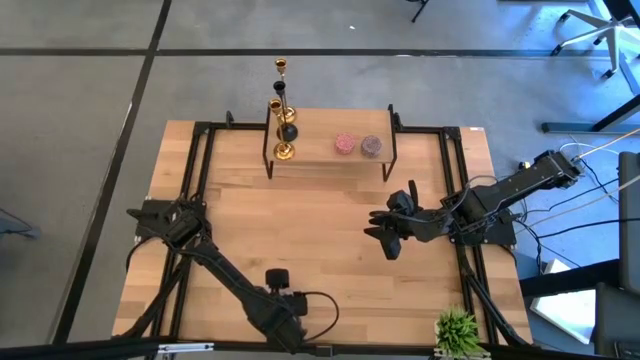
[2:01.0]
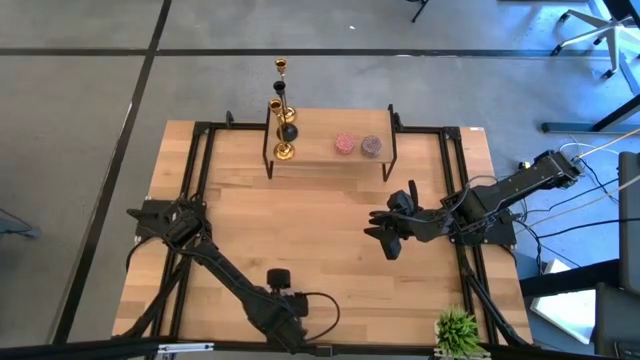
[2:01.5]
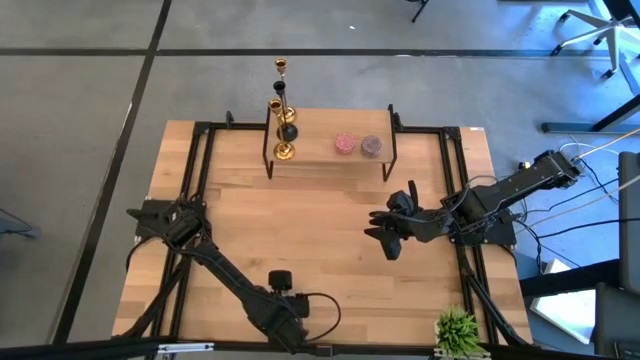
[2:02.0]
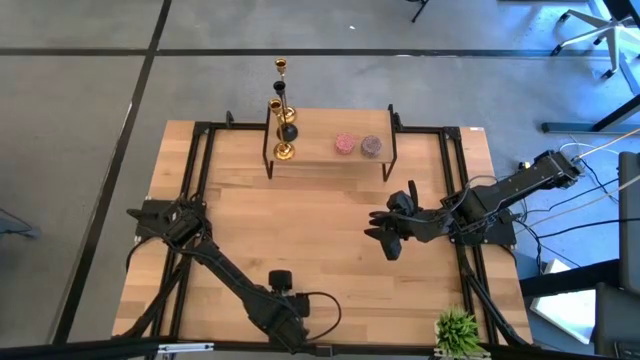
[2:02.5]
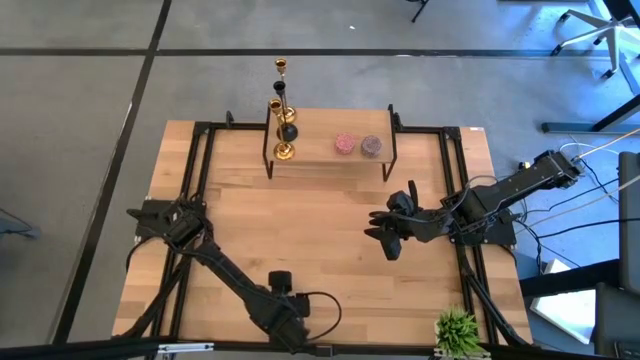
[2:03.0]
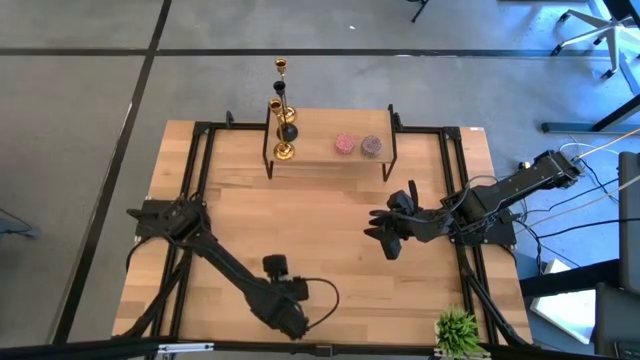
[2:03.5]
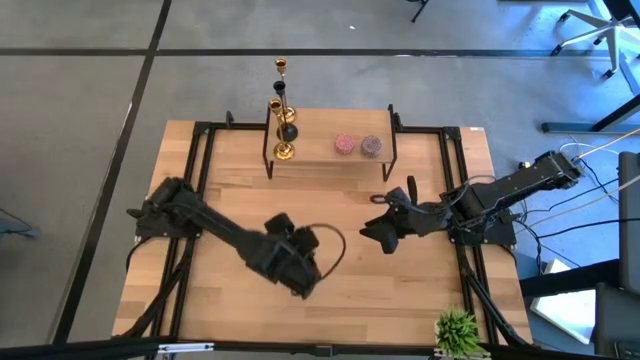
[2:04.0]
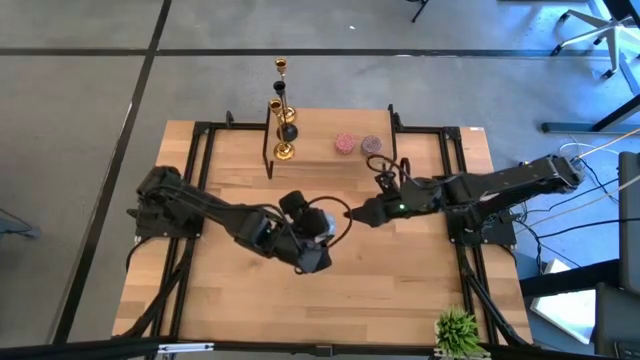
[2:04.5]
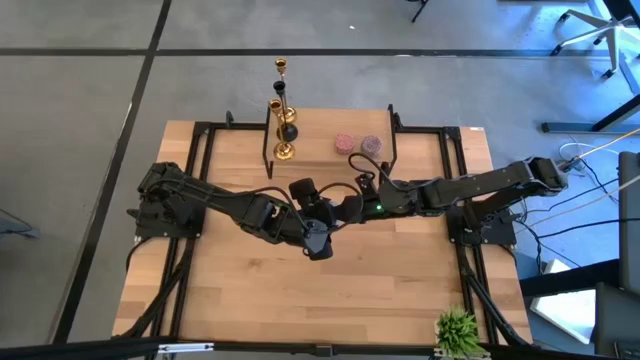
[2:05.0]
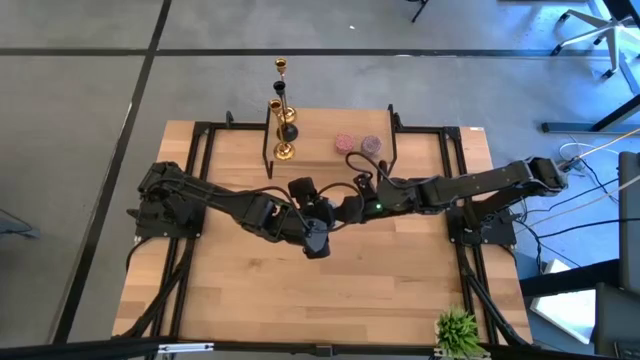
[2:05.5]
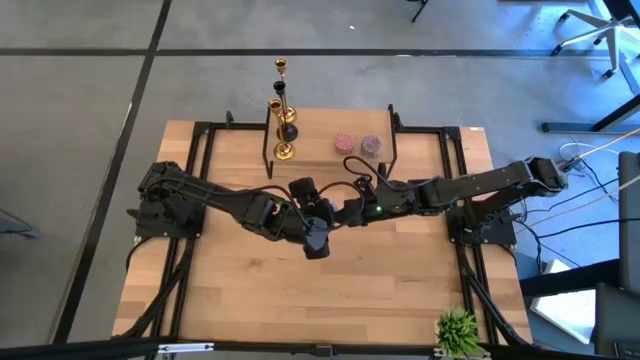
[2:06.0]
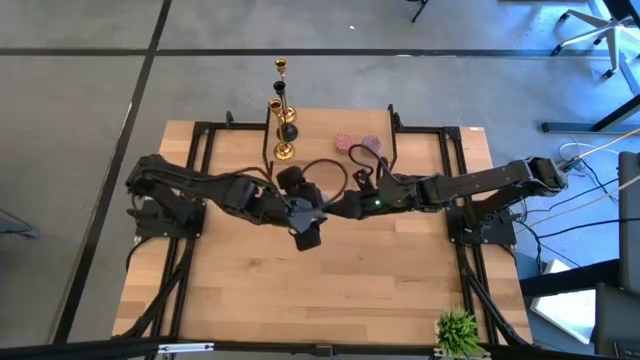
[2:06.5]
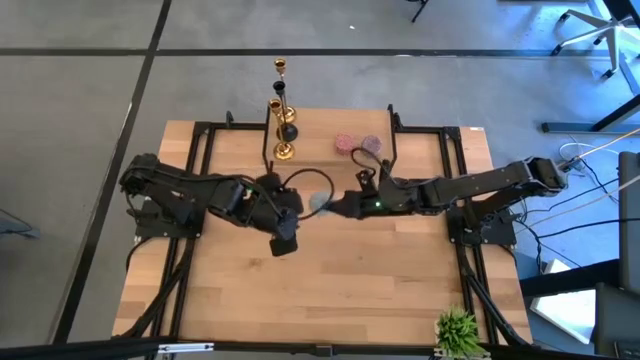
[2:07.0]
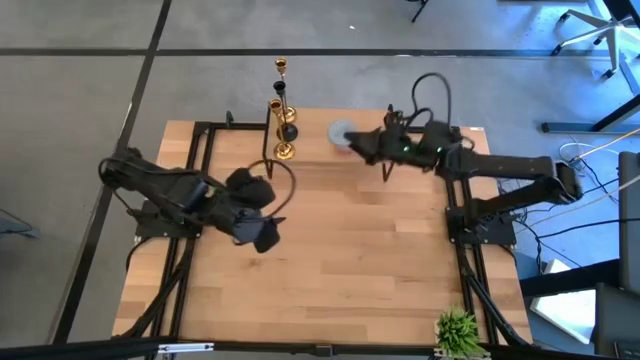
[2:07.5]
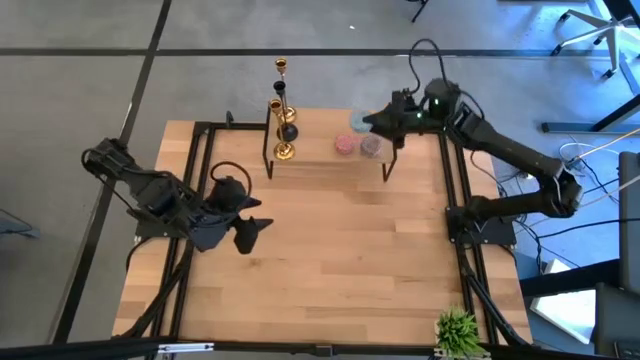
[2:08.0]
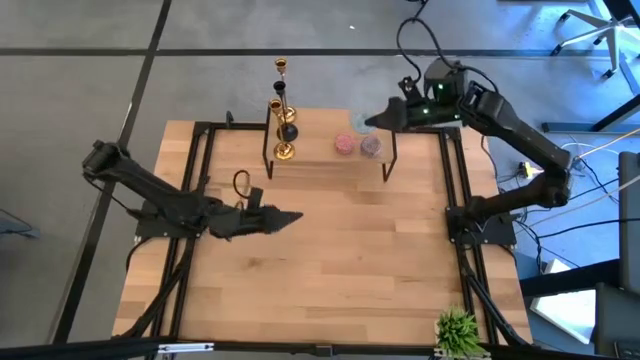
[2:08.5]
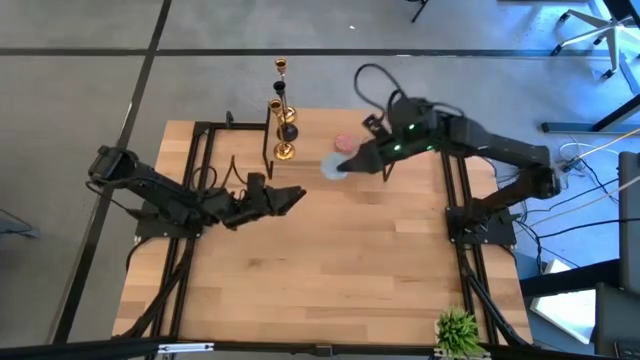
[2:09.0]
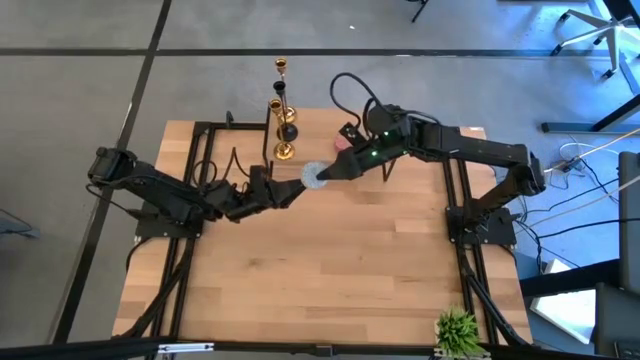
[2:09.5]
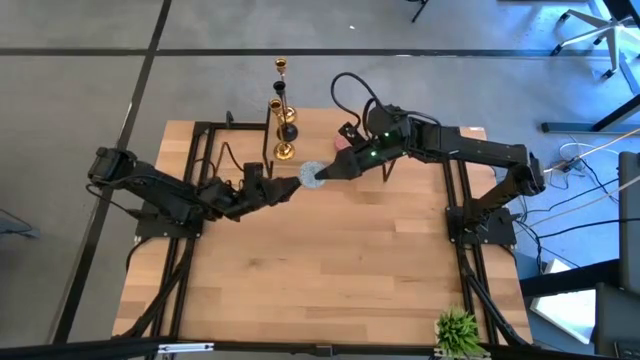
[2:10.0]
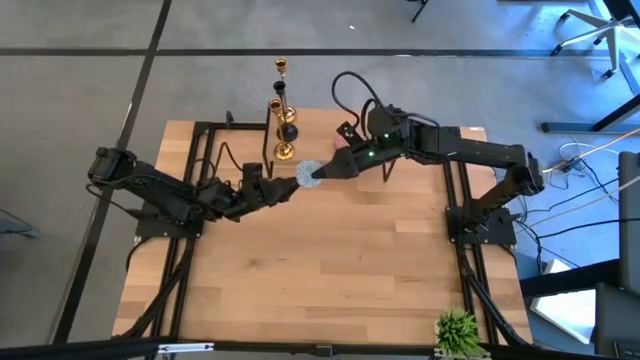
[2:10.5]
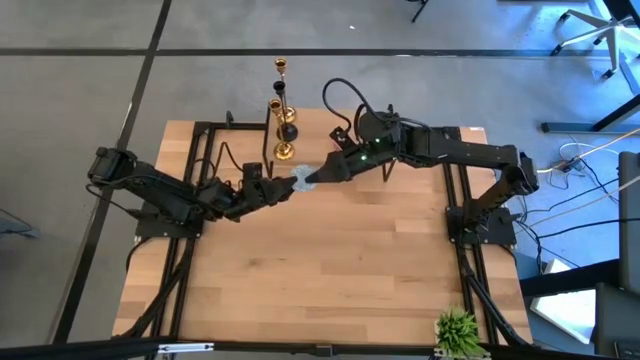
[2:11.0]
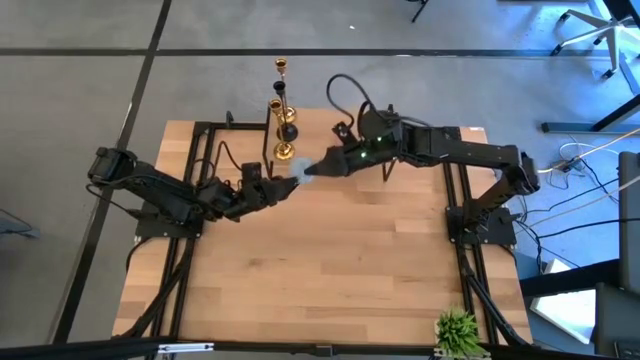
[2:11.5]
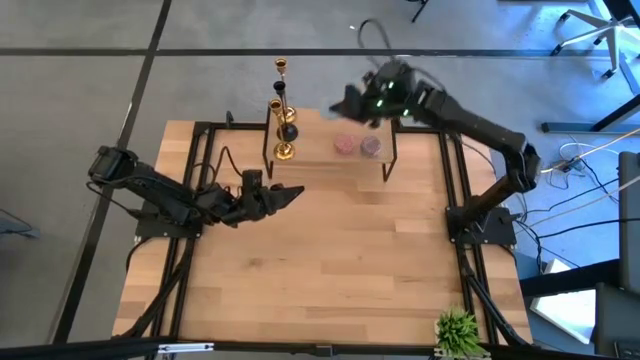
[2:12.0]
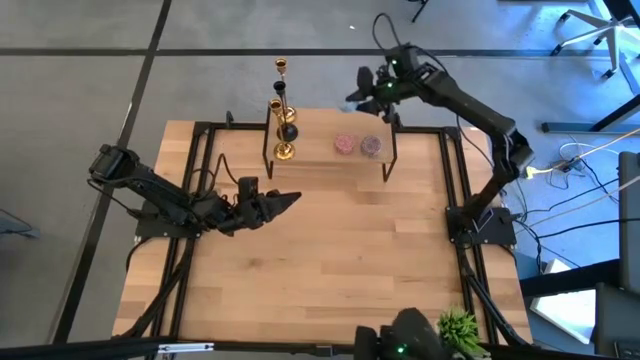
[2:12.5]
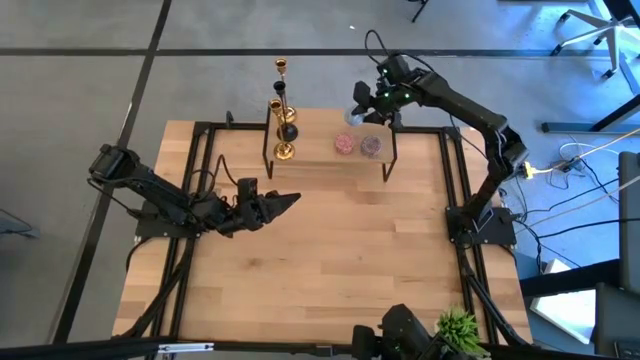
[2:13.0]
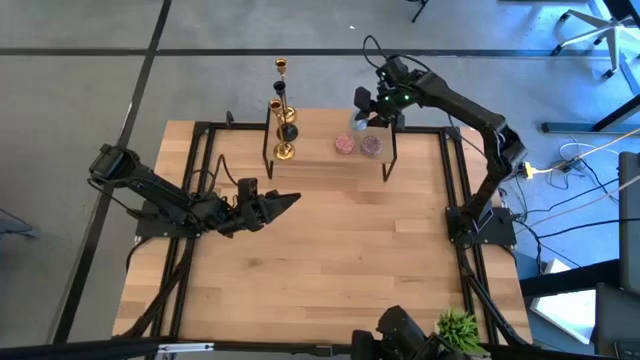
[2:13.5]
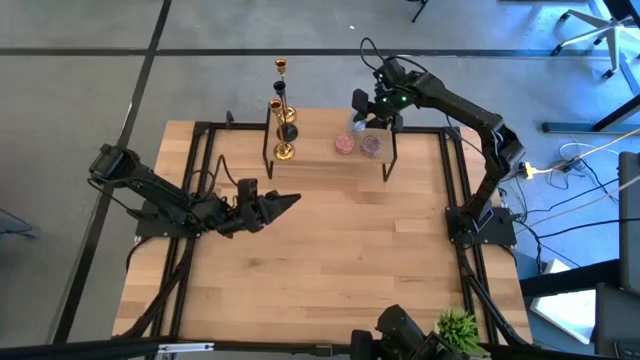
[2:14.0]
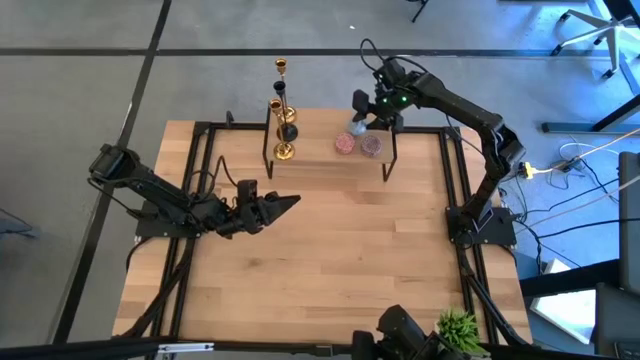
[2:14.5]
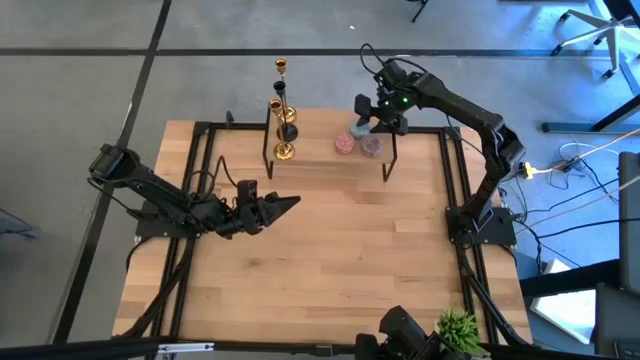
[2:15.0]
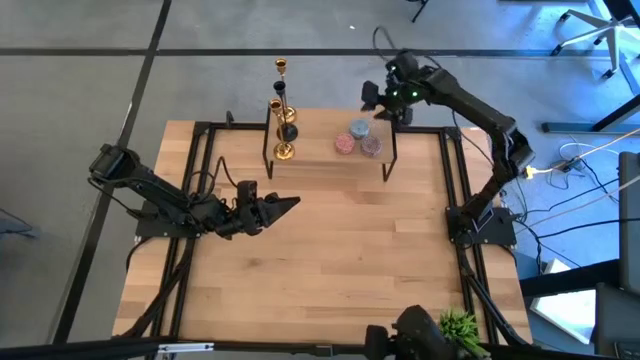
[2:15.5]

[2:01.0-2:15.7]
Task: Pick & Place candle stick holders
Put the blue candle on the shelf

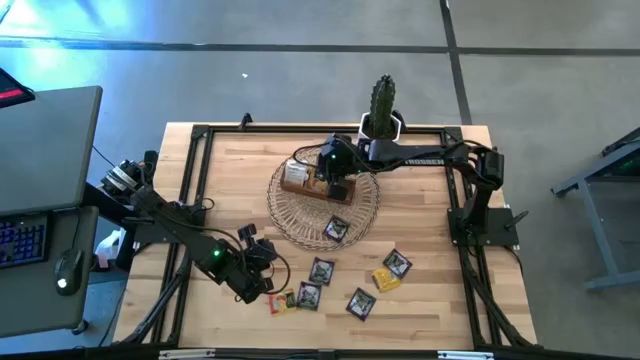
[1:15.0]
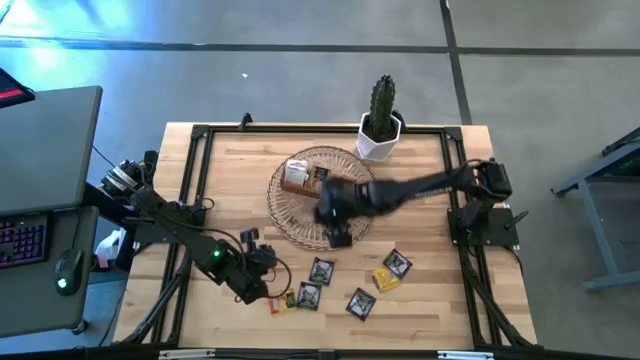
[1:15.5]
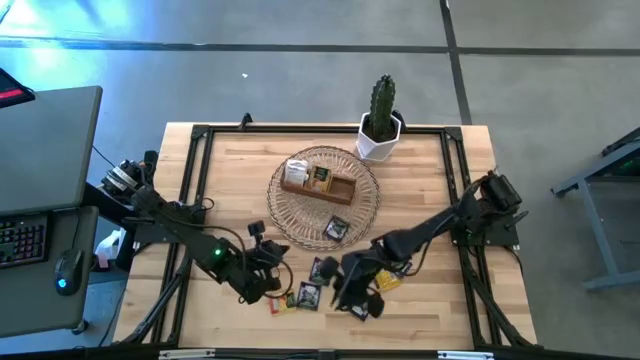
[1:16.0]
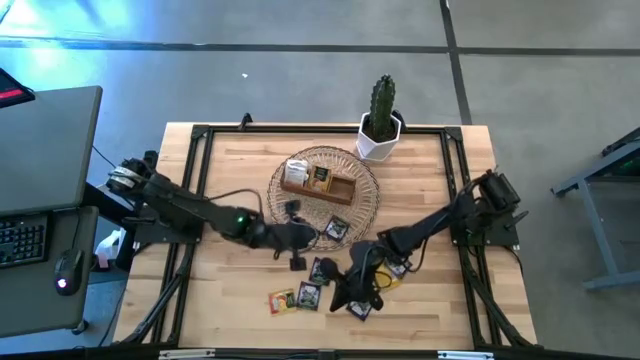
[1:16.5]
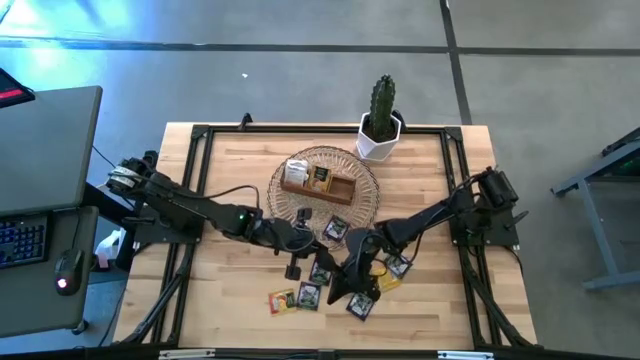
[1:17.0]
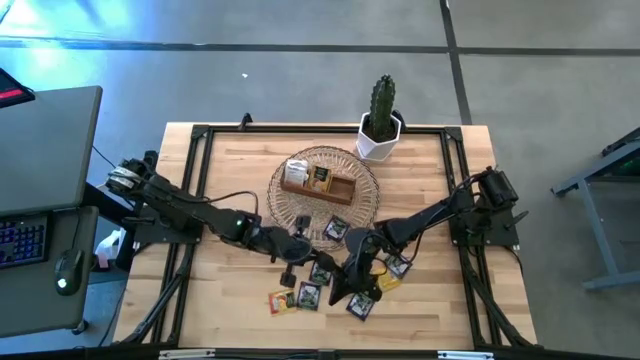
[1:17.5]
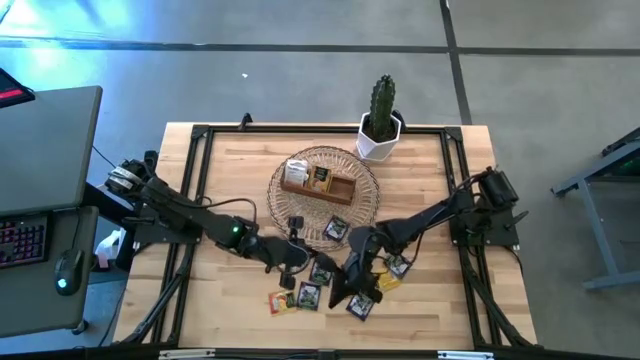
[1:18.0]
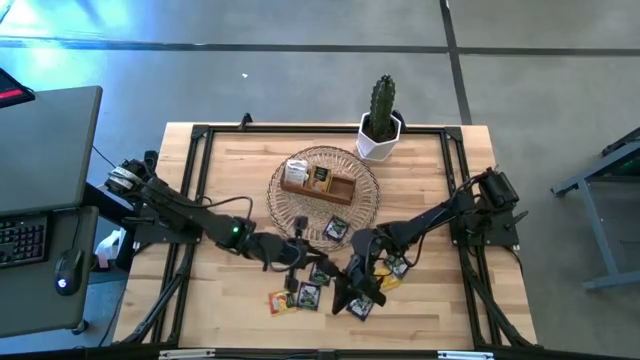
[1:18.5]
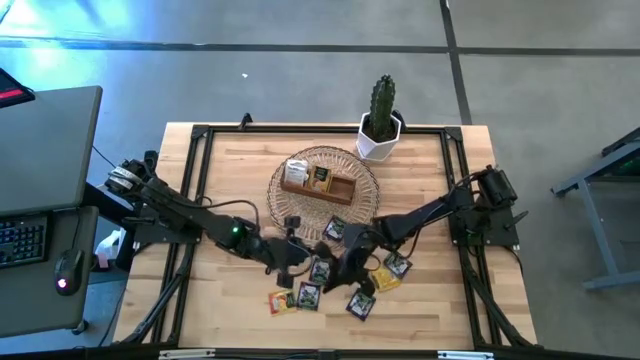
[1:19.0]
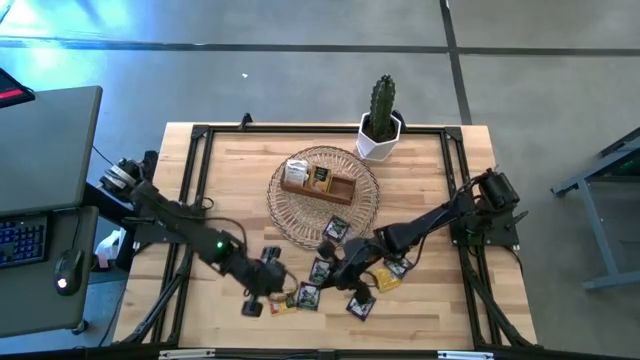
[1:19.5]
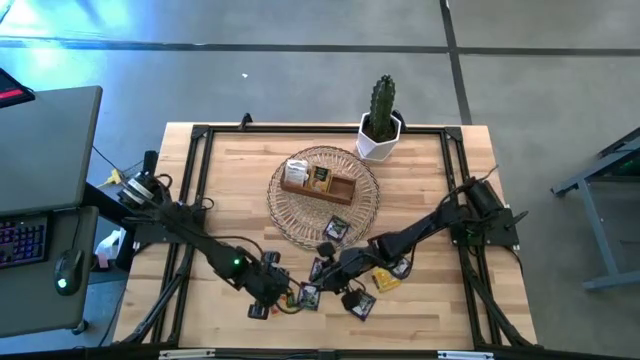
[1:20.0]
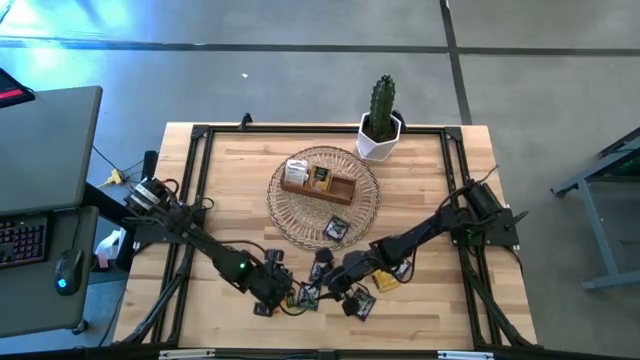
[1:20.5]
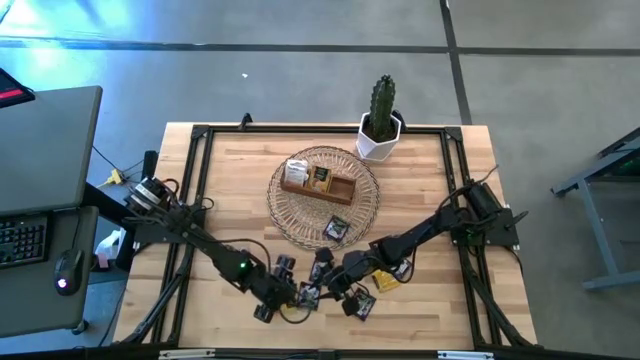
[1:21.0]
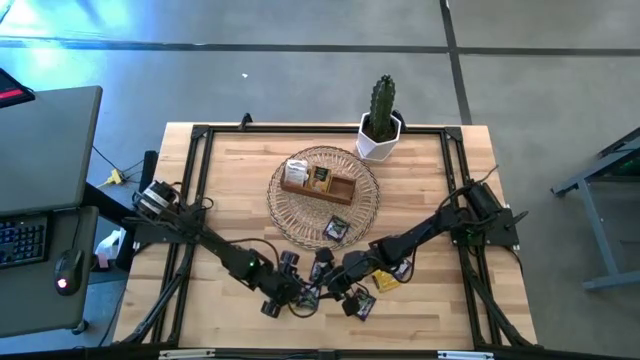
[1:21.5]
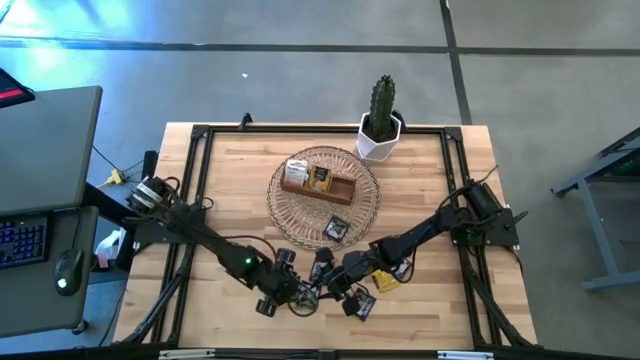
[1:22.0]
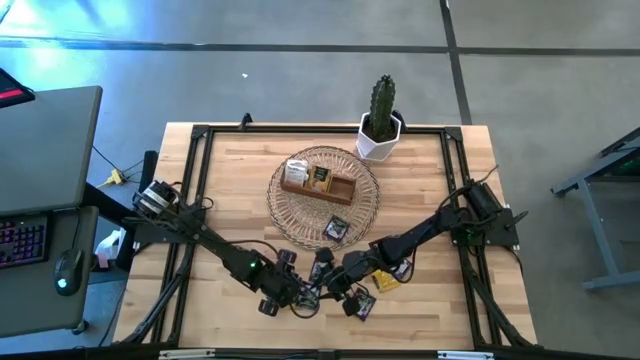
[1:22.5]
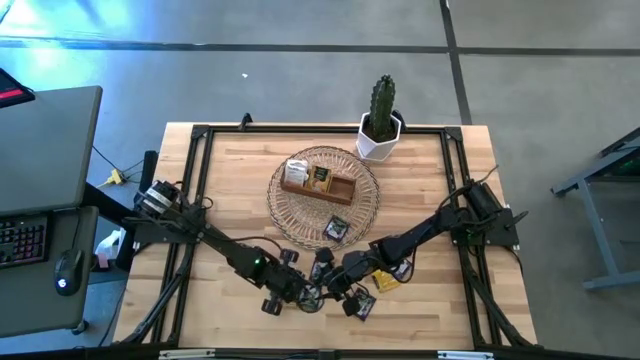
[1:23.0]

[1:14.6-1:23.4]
Task: Pick & Place Tea
Put the yellow tea pack into the middle section of the wooden organizer
